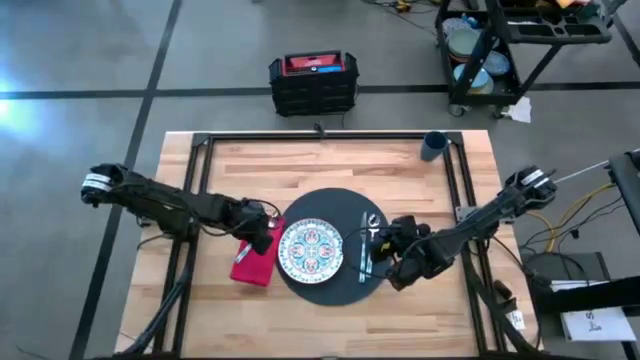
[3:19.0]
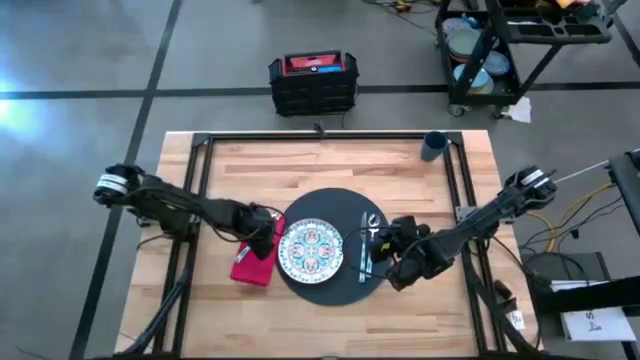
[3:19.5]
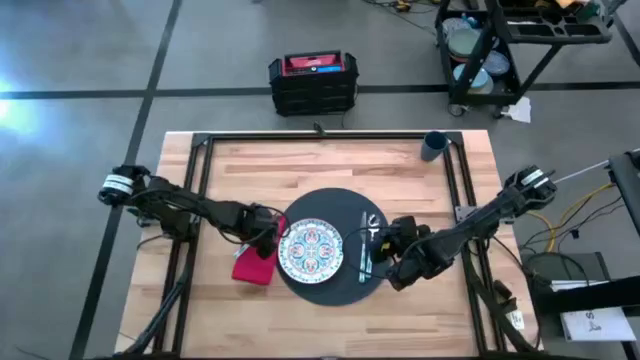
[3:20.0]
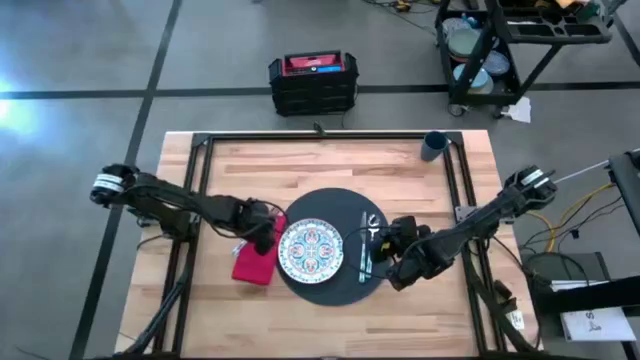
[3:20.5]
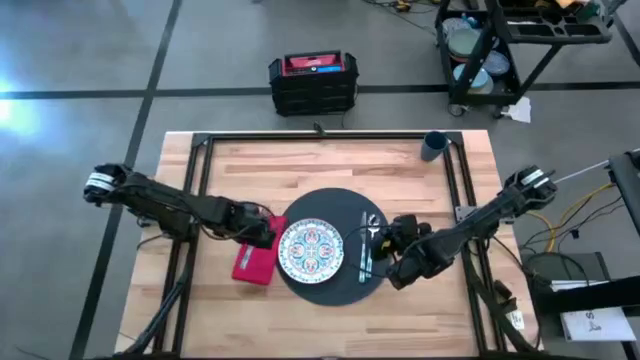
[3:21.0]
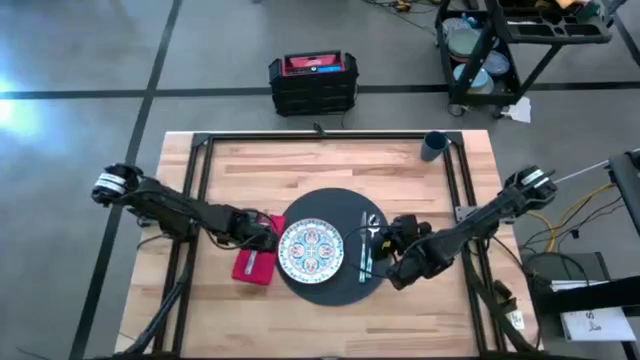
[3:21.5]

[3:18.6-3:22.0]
Task: Set table place
Adjust the blue fork

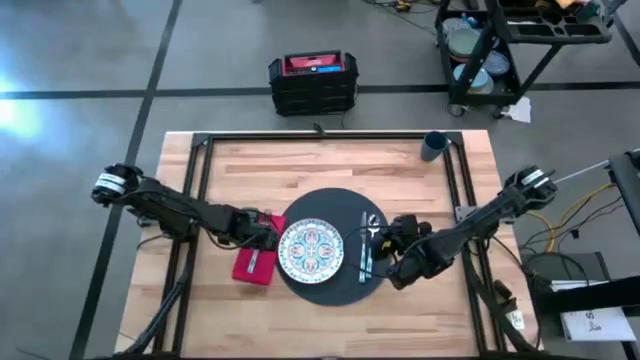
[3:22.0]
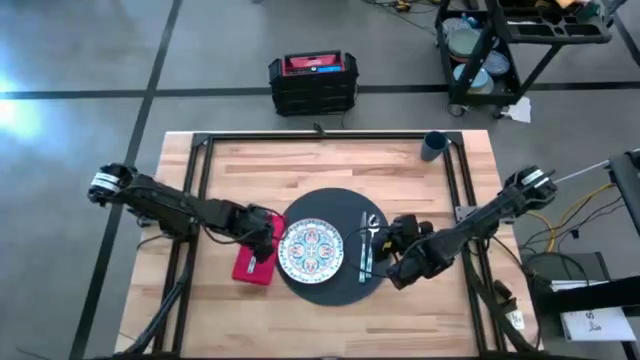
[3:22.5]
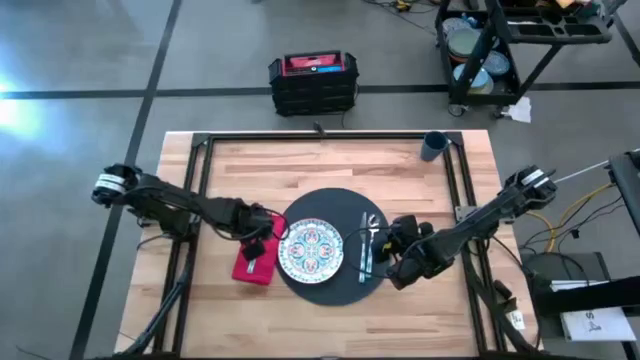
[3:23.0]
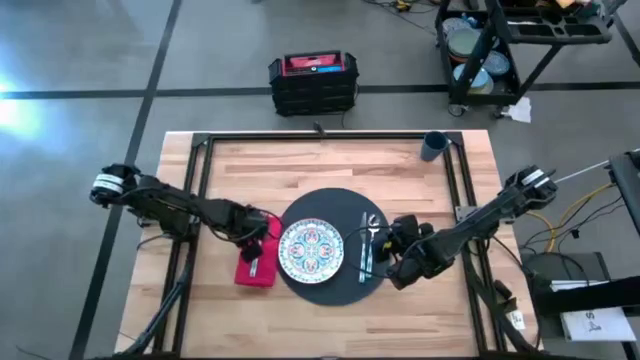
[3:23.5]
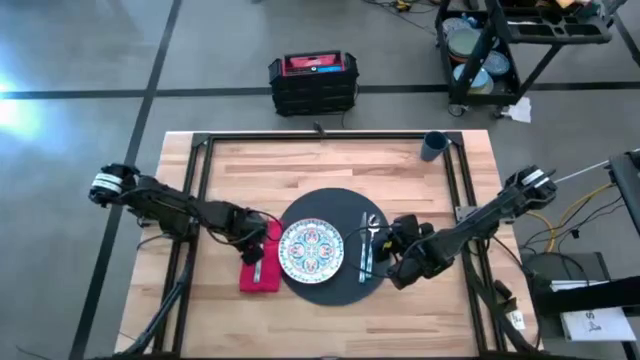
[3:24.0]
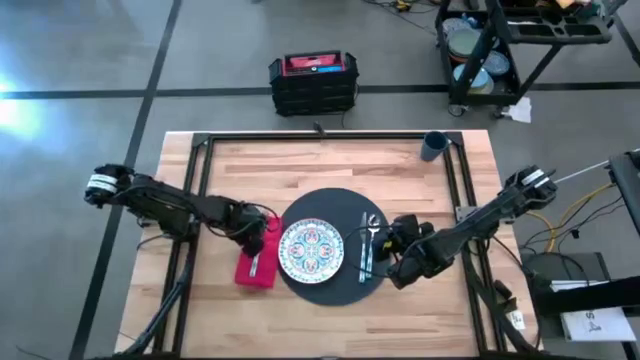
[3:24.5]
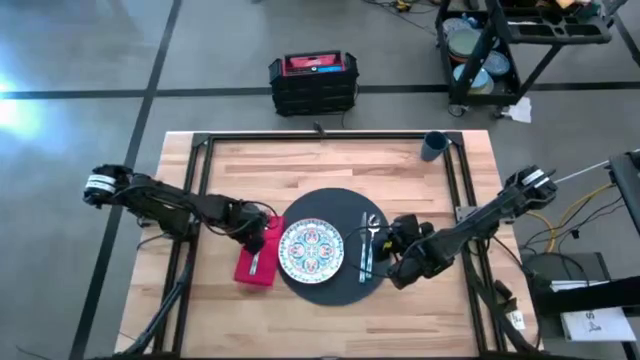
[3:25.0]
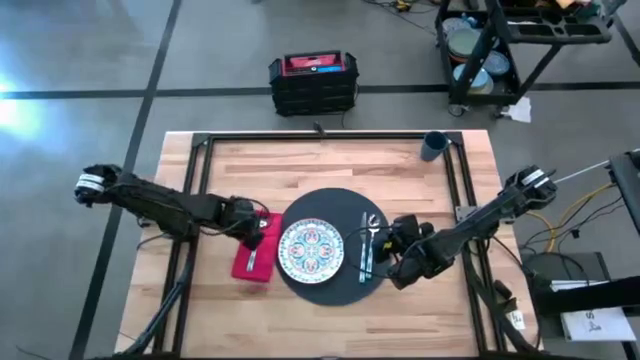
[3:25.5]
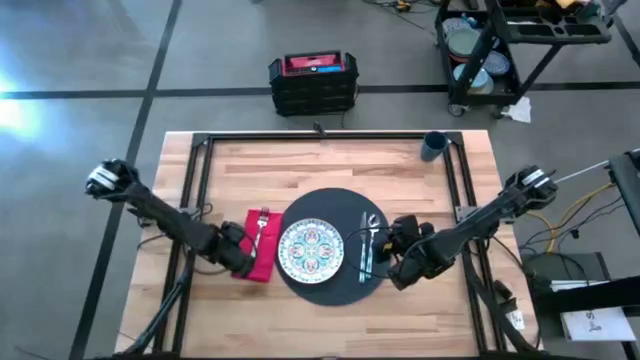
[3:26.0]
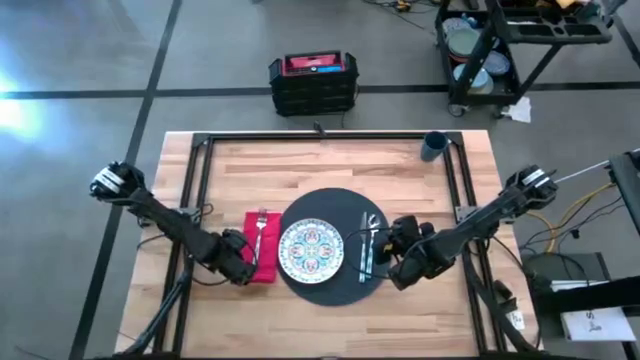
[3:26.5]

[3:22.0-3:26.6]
Adjust the blue fork on the left side of the placemat

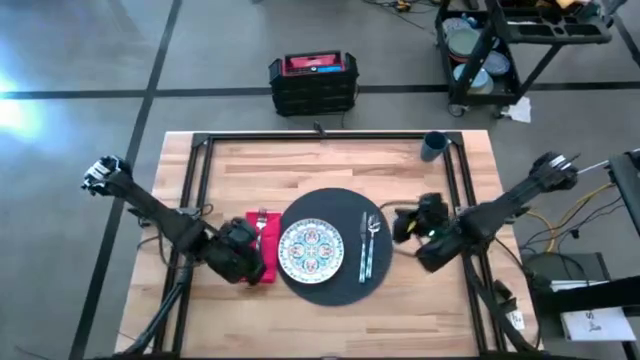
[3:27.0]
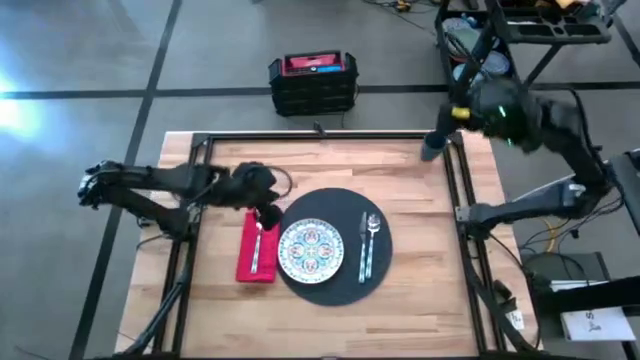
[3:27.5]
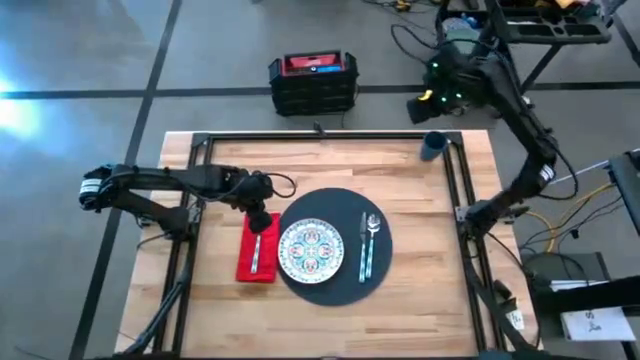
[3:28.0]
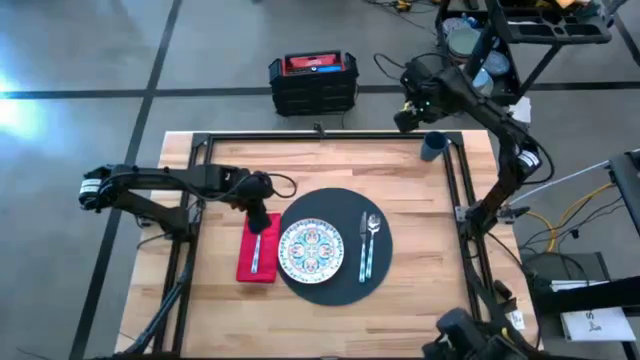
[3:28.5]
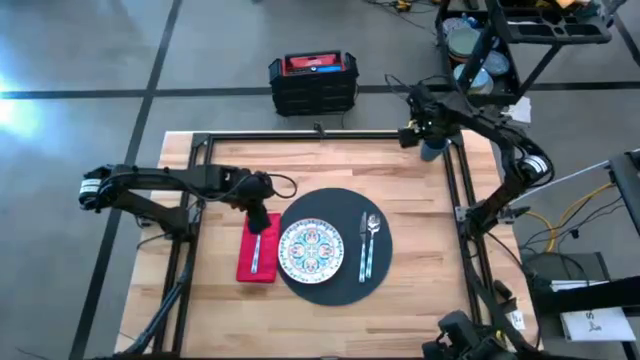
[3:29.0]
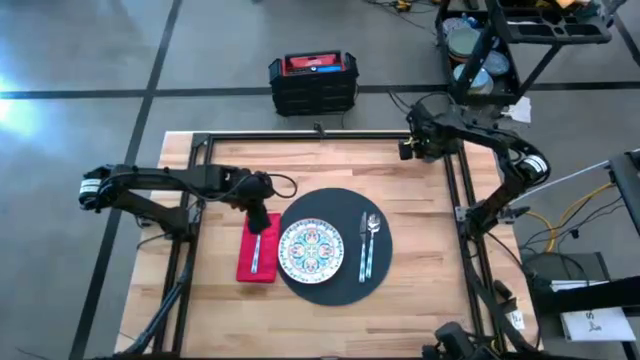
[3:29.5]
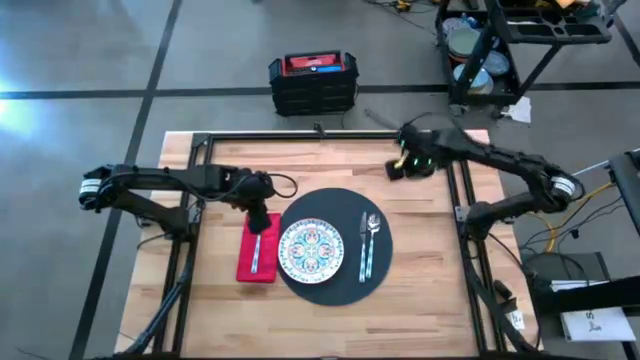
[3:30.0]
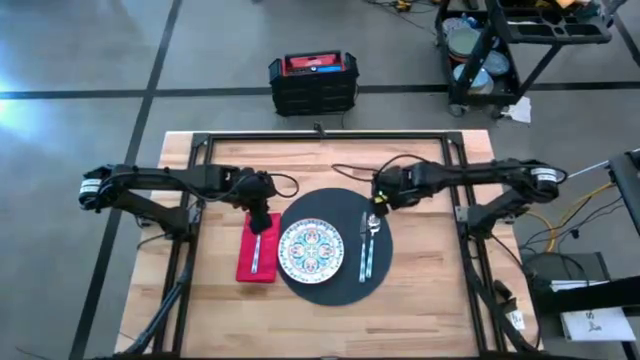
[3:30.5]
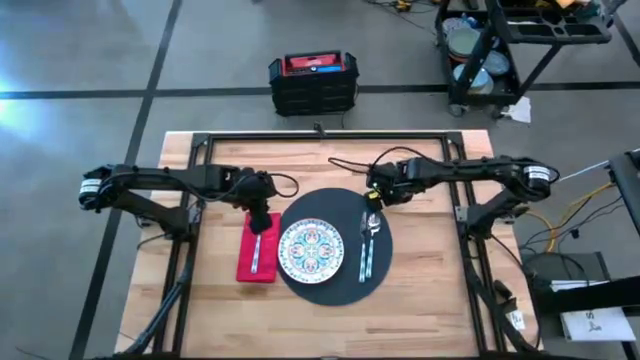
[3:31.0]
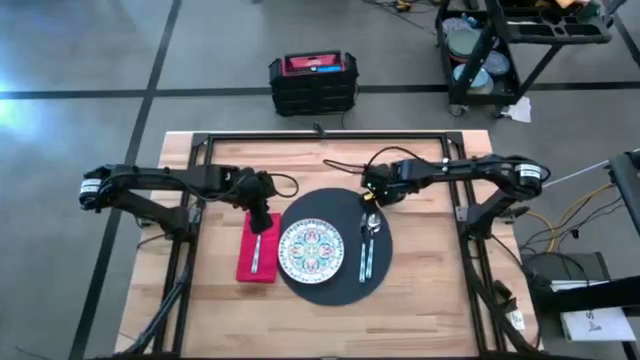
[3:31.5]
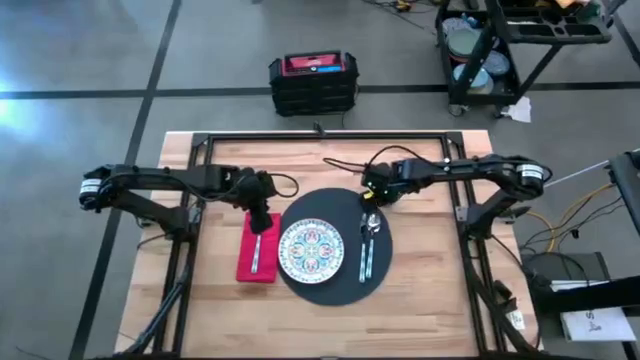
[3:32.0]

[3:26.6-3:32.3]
Put the blue plastic cup to the top right of the black placemat

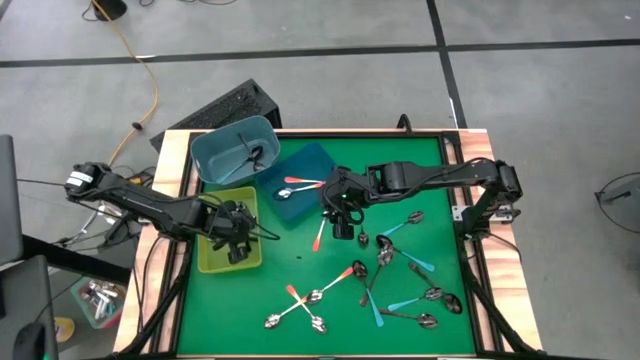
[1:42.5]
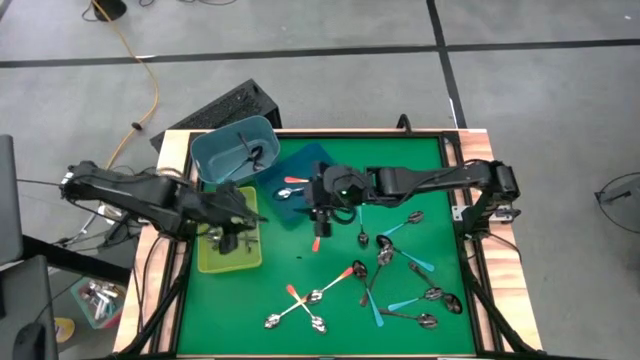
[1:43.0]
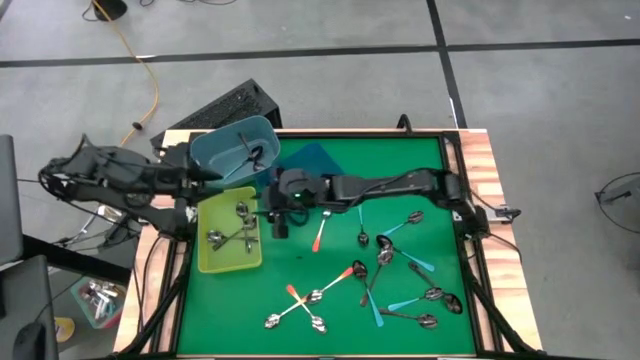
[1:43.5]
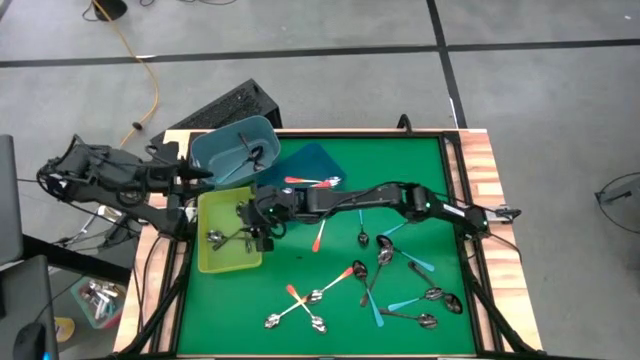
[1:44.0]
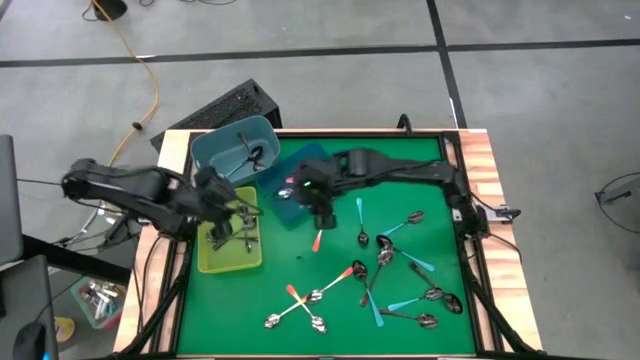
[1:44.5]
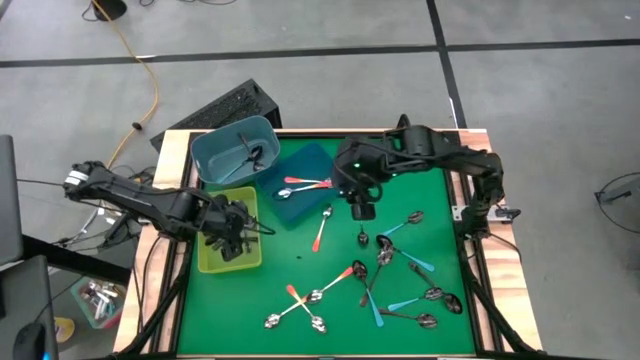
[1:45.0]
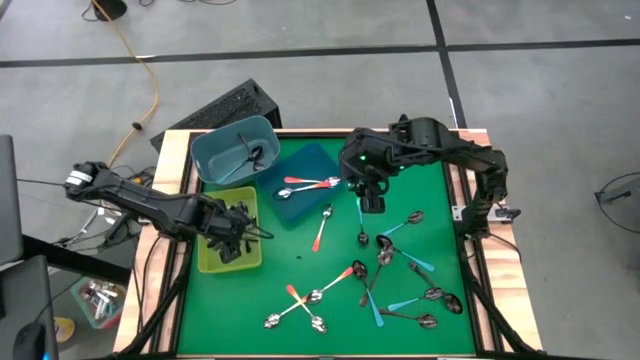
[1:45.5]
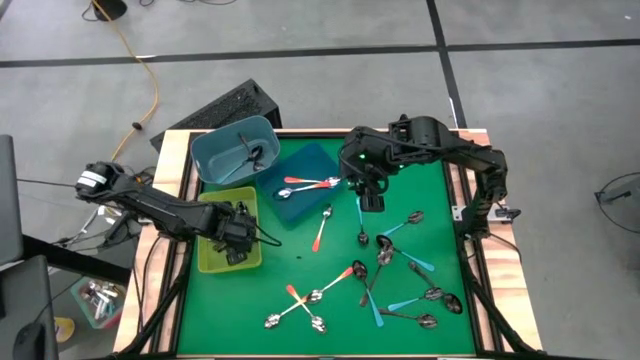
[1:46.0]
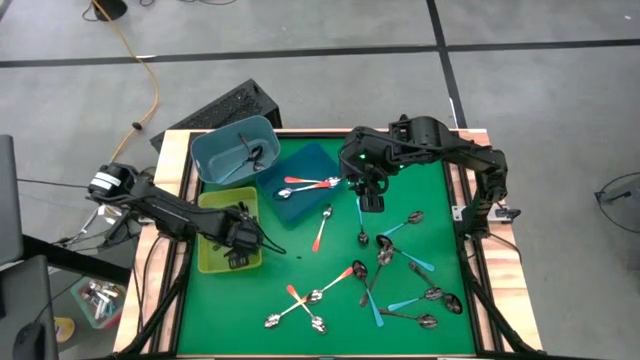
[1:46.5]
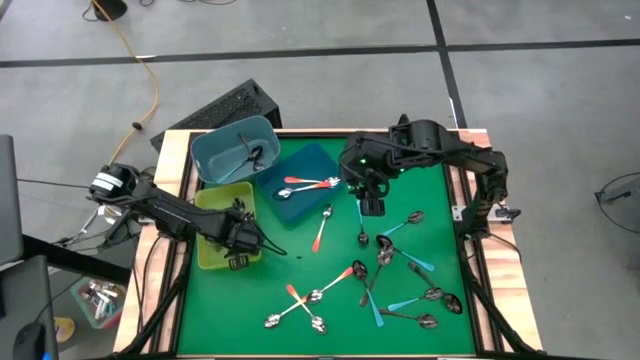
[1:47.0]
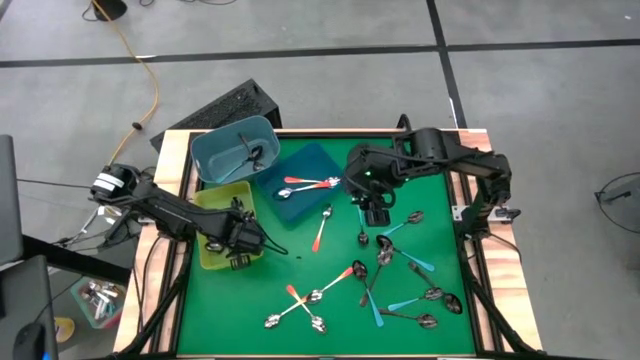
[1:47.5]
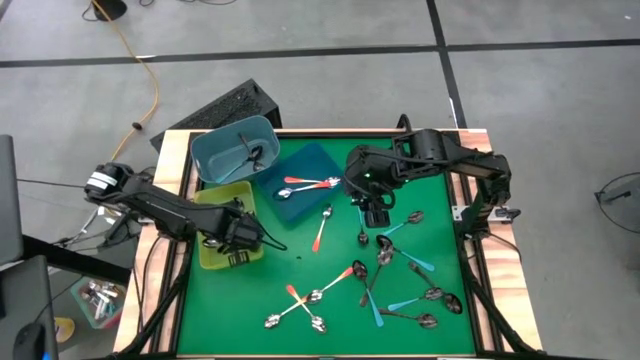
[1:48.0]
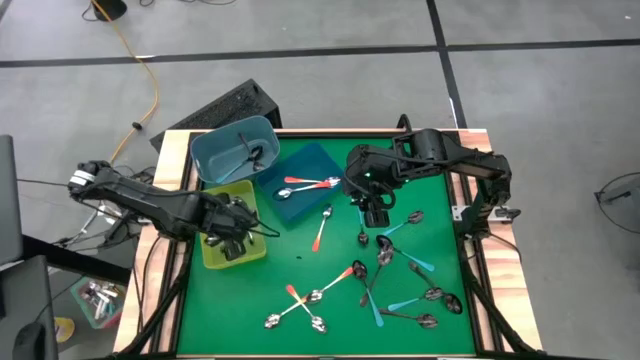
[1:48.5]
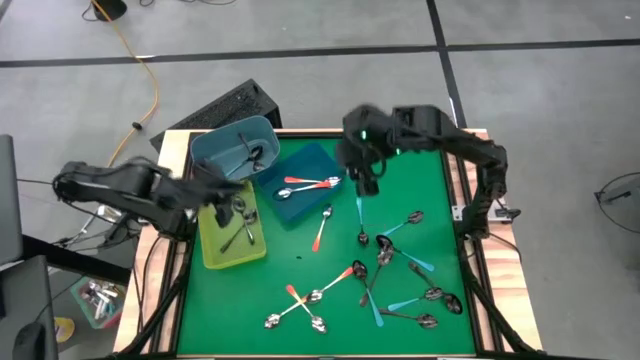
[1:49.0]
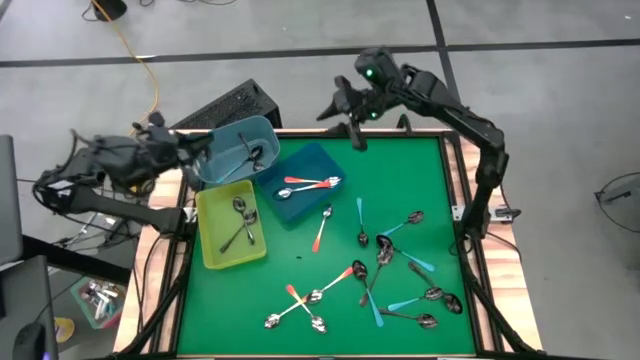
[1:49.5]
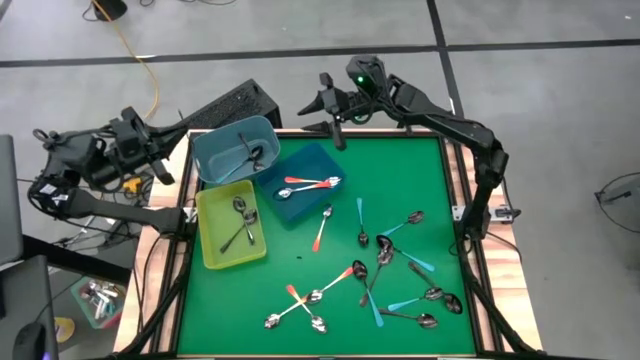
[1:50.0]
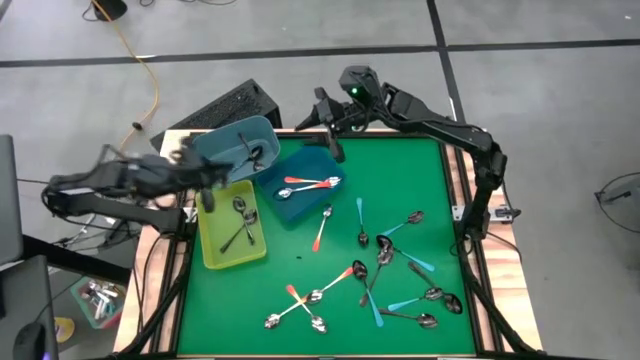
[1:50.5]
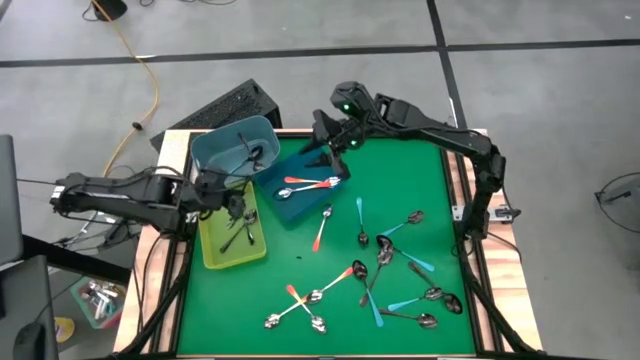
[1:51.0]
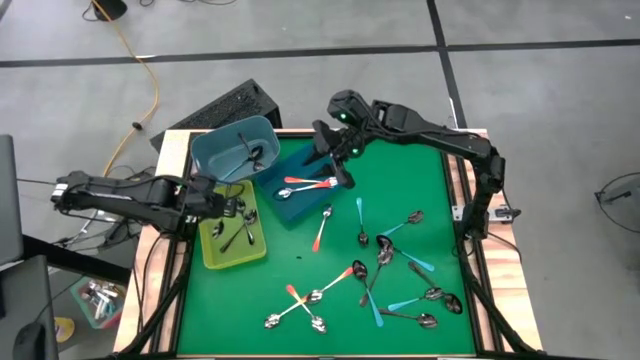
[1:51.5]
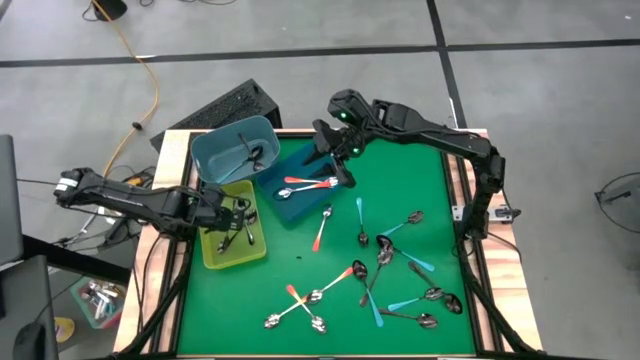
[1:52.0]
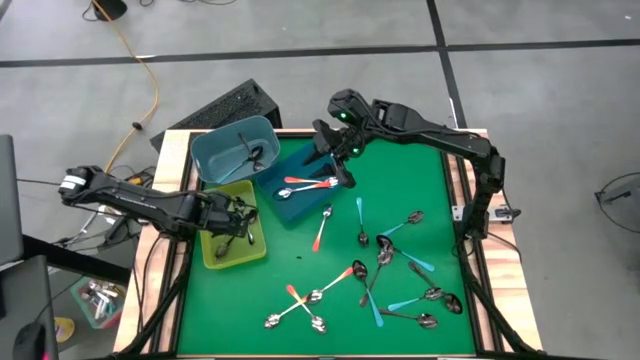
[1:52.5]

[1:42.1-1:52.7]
Task: Sort silverware by color (type)
Adjust the black spoon in the green bin
